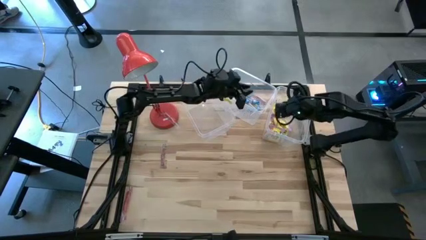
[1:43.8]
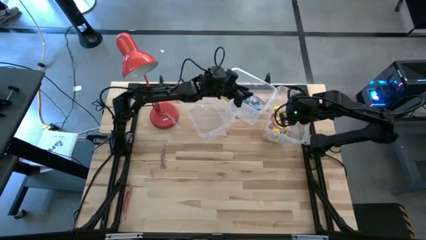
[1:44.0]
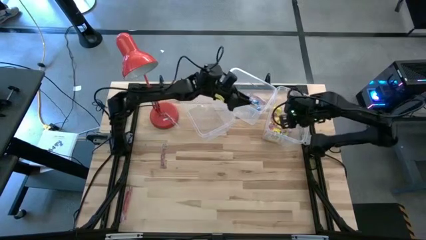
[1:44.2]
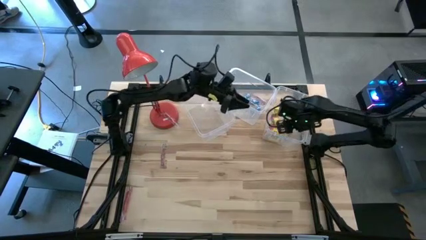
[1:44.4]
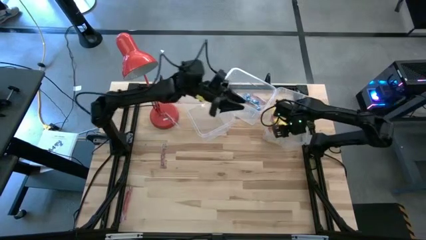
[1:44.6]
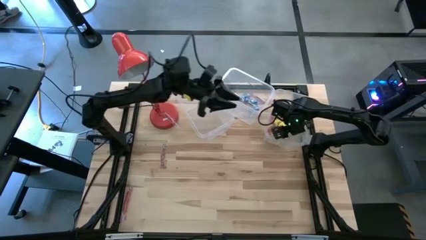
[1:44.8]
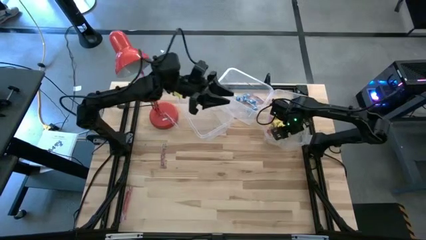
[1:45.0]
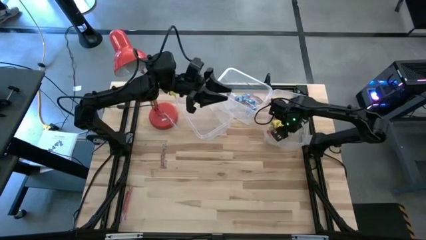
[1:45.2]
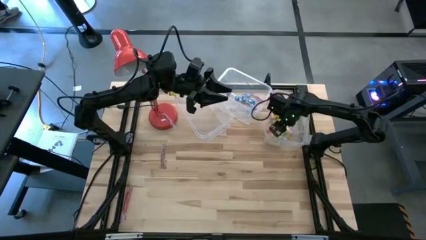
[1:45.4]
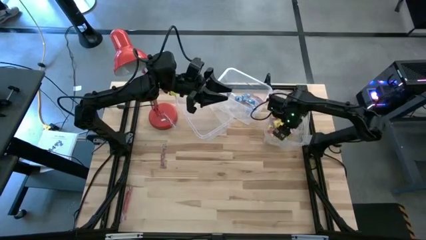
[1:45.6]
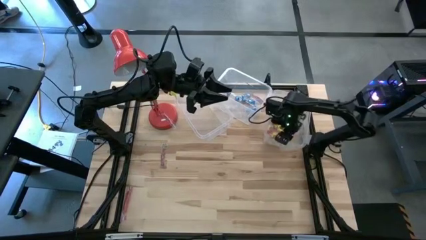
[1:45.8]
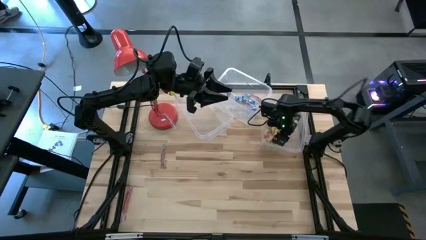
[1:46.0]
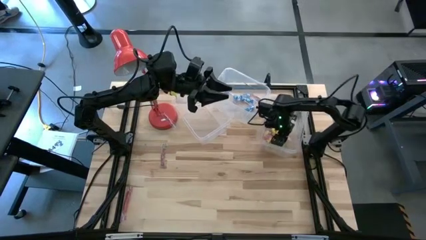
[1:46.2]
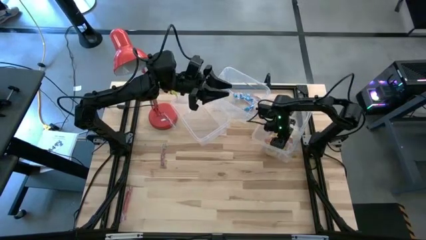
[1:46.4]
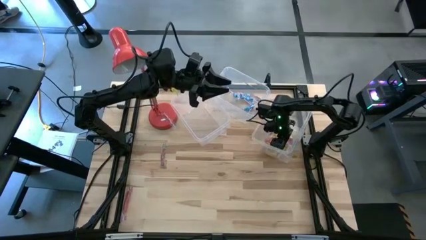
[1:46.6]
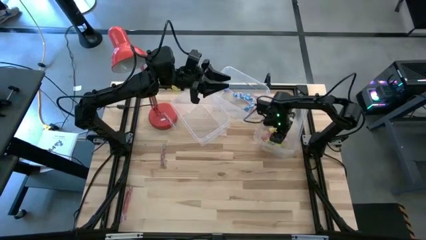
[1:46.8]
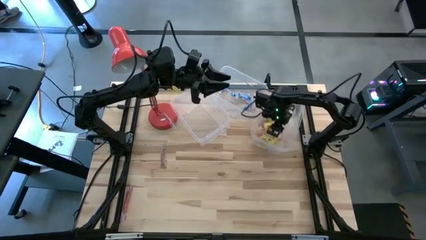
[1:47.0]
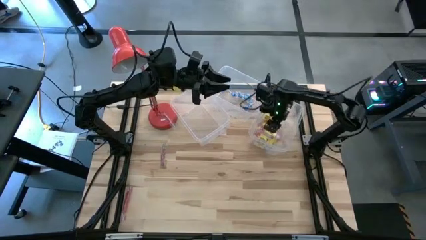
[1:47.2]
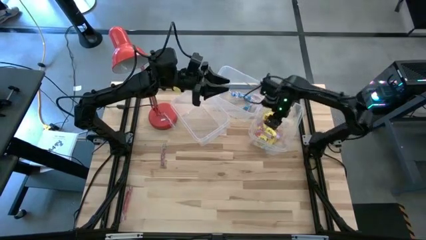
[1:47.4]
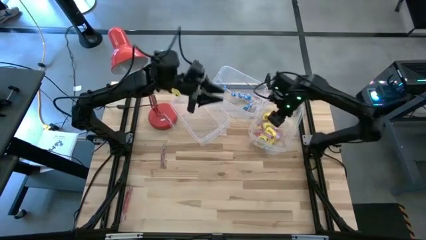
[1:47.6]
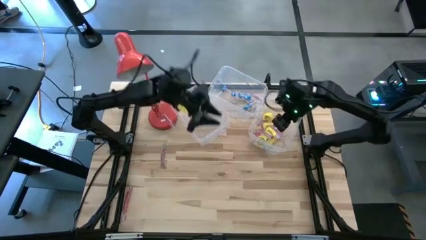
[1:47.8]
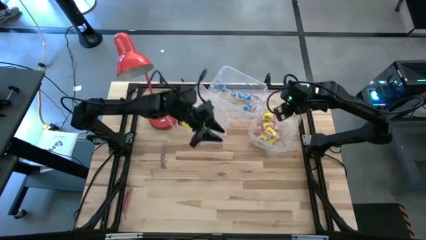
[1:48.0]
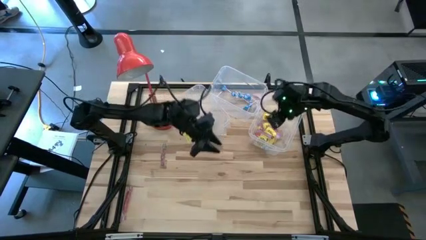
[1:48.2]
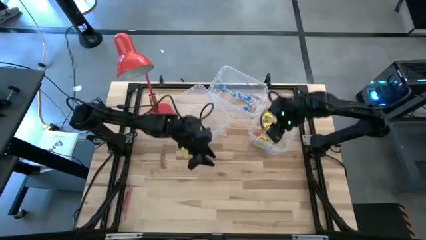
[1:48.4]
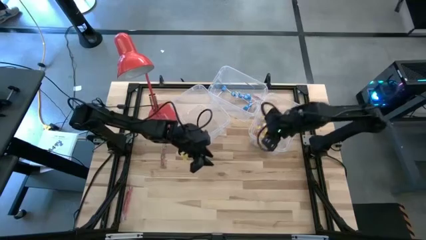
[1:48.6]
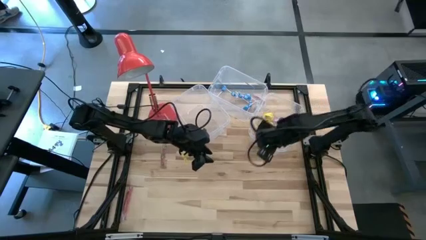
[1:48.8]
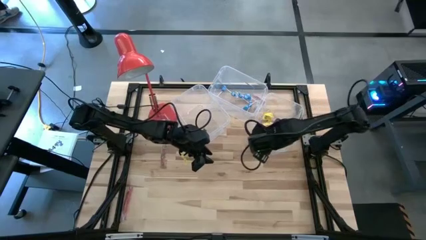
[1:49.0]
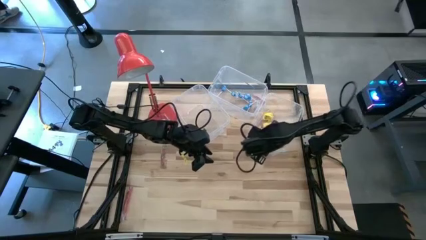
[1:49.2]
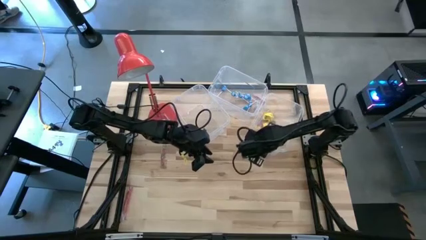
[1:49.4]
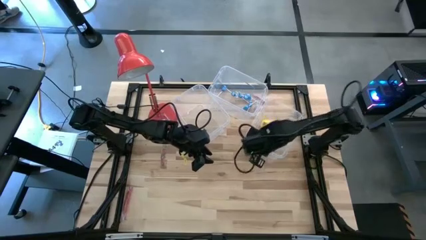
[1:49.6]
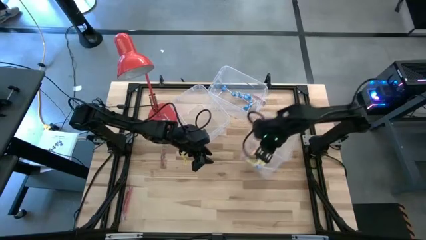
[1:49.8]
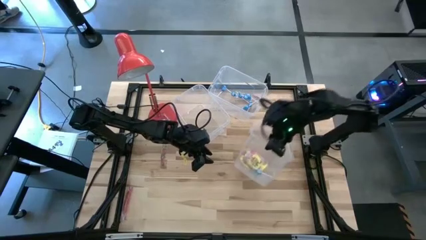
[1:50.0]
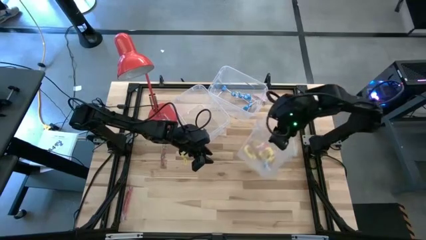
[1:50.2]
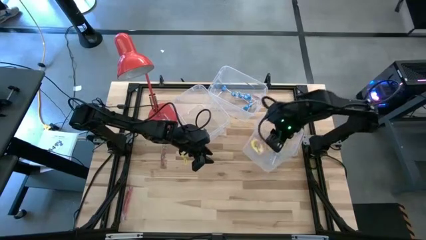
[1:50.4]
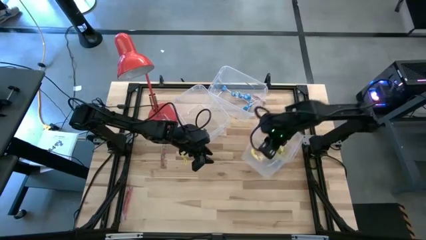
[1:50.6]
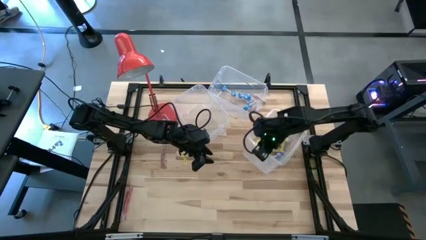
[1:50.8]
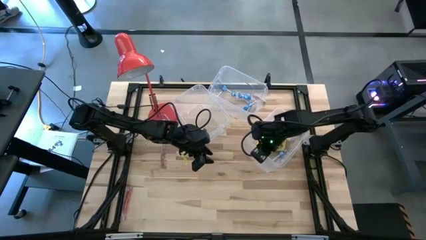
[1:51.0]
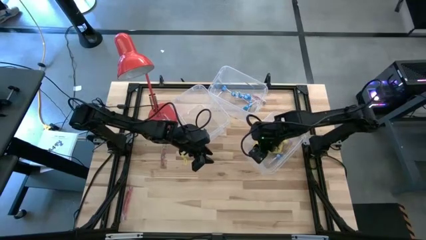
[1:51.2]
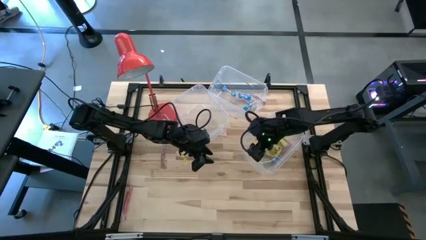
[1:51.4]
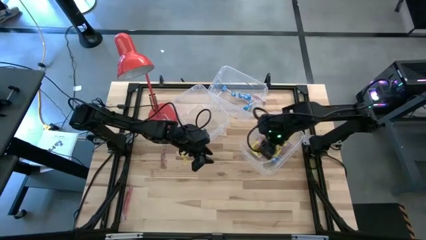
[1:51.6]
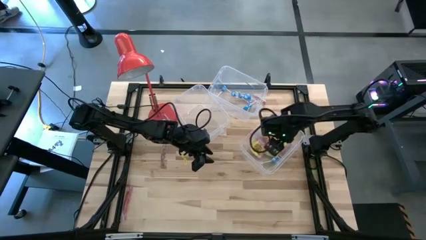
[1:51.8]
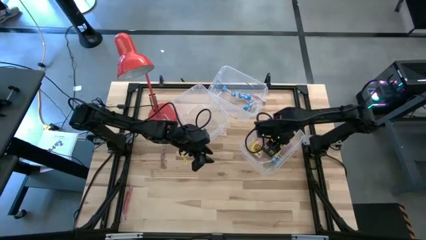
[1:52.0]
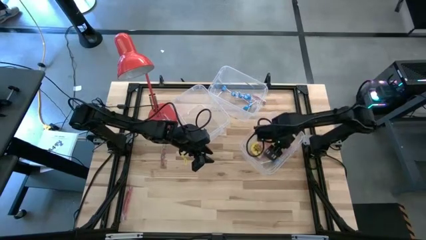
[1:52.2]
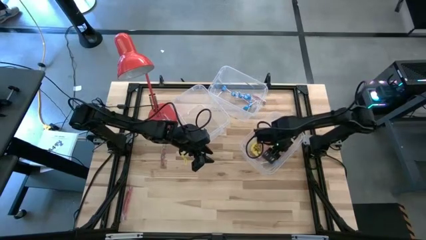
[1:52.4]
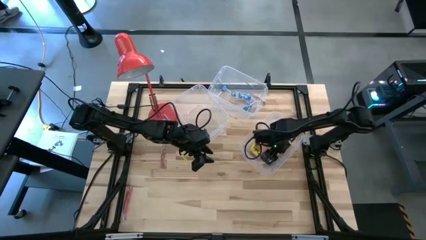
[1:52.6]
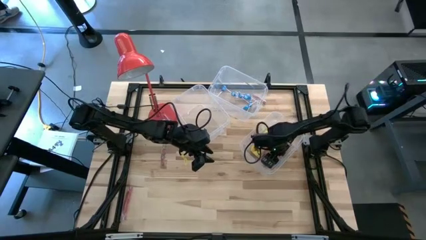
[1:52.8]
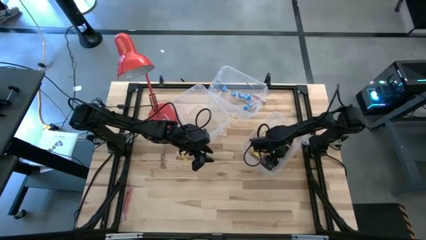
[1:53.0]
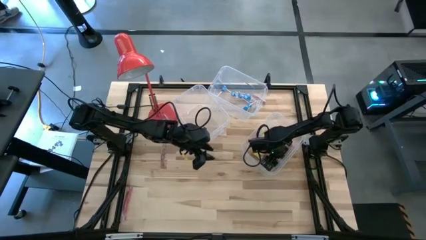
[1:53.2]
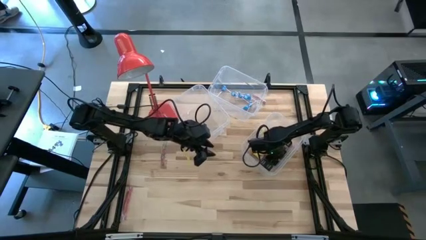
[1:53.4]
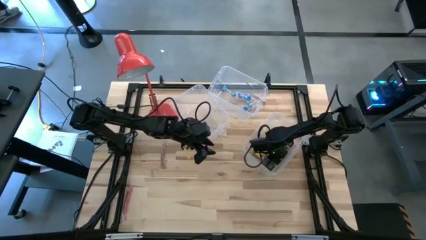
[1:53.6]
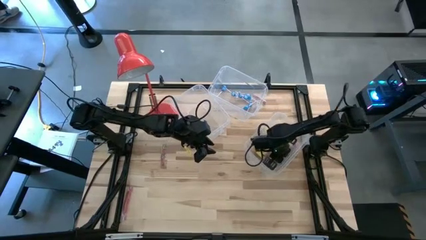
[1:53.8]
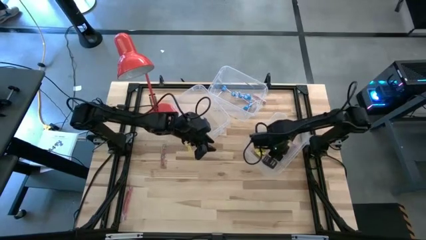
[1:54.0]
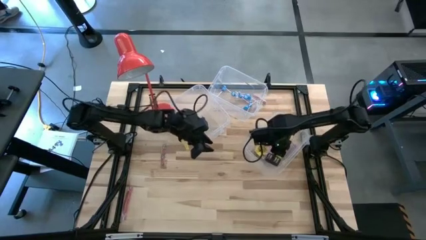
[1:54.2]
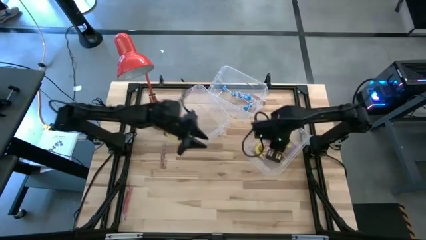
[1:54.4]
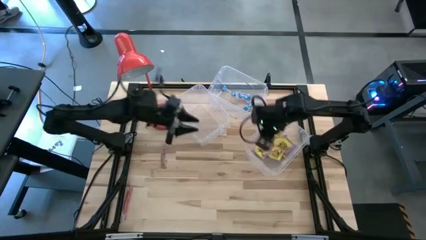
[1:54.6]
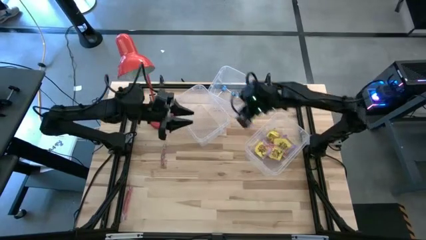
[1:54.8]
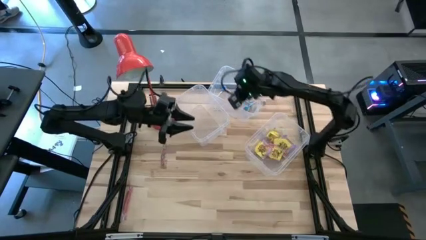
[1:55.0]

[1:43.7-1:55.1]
Task: Sort candy
Put the blue candy into the center transparent bin

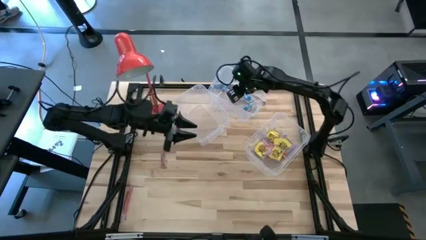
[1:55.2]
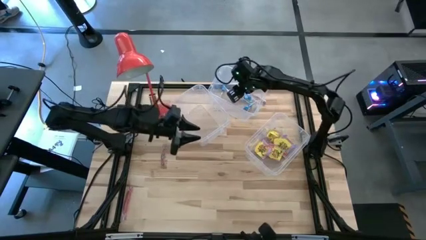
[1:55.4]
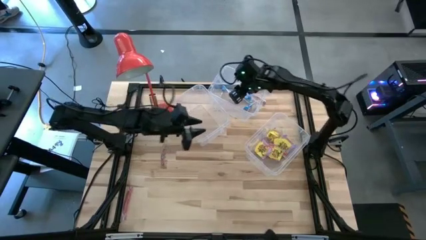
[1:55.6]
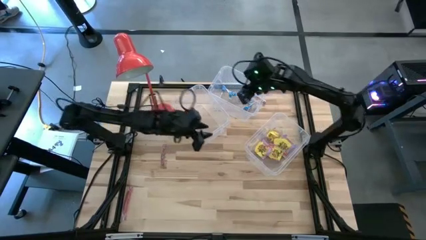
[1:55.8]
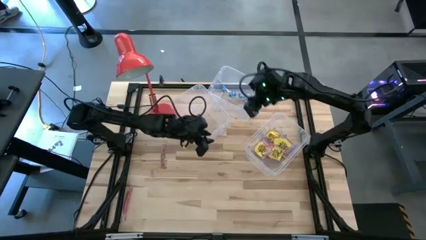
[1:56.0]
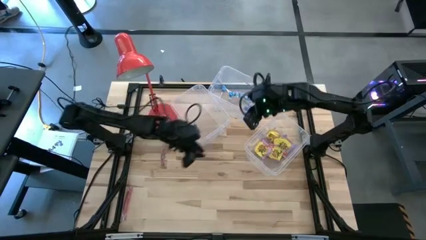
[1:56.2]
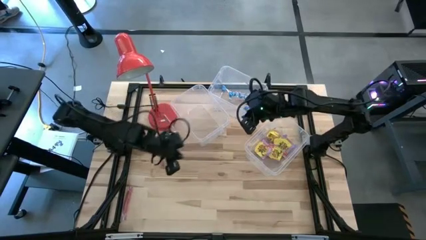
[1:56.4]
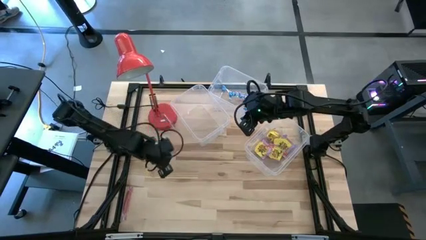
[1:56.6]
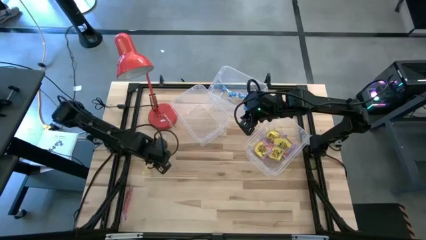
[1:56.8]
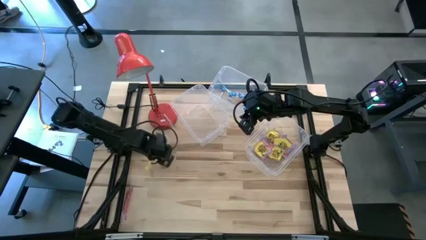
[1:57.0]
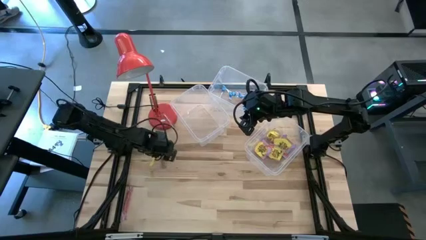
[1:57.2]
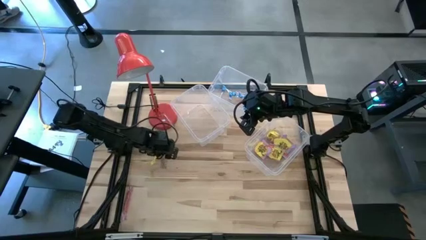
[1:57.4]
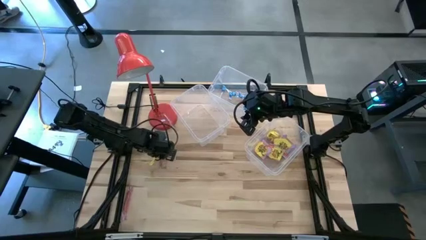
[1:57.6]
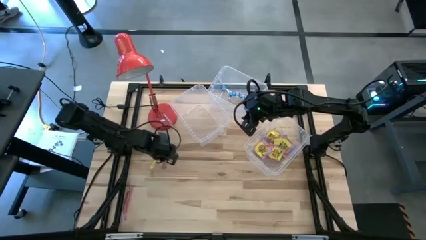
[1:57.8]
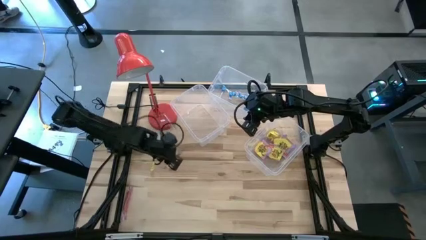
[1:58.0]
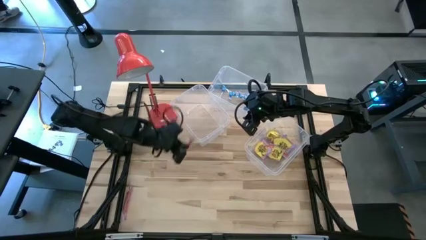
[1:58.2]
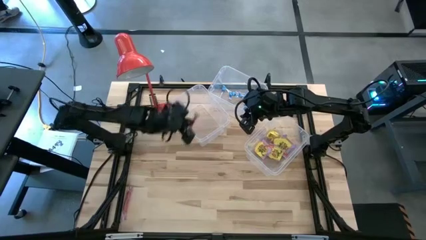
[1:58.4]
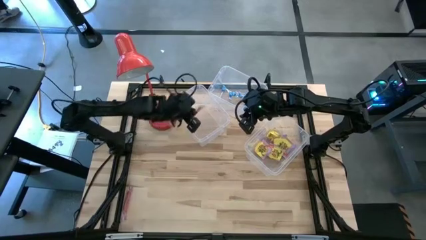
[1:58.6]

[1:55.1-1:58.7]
Put the red candy into the left transparent bin
